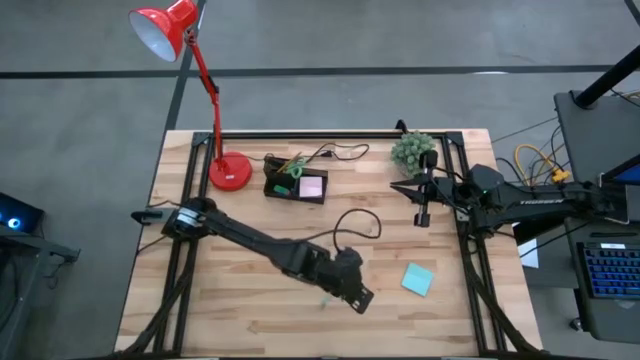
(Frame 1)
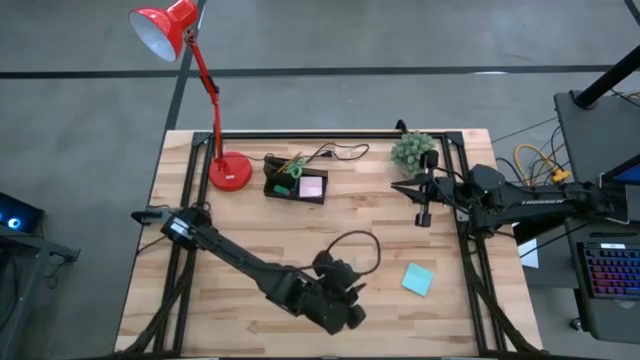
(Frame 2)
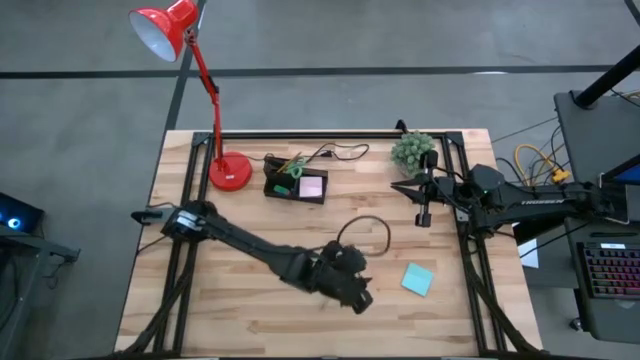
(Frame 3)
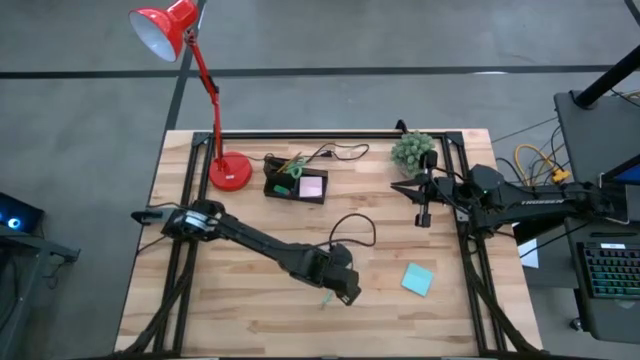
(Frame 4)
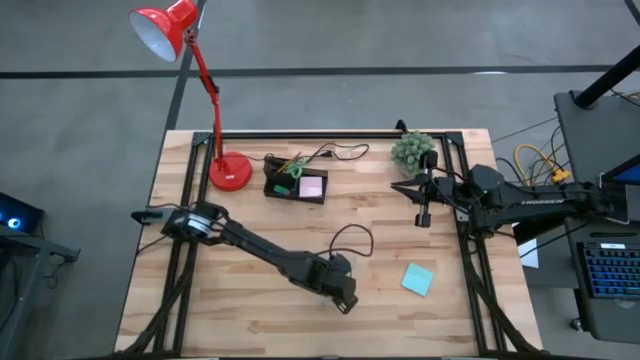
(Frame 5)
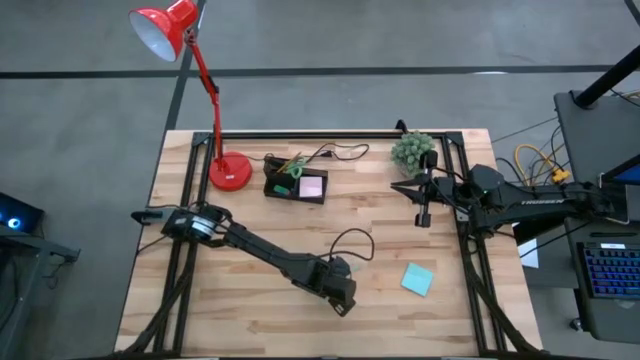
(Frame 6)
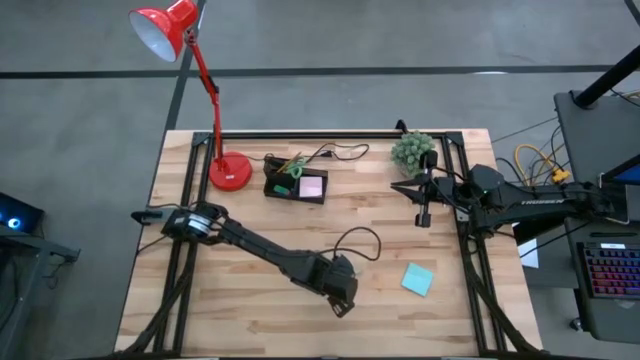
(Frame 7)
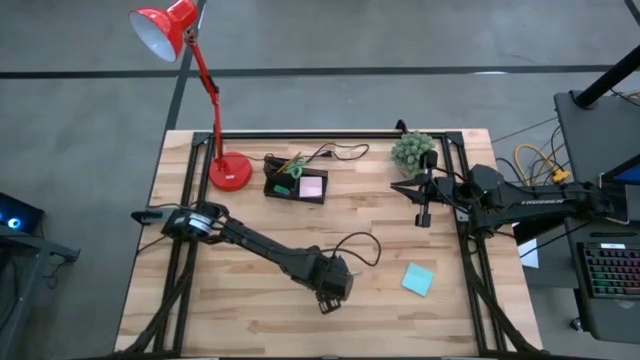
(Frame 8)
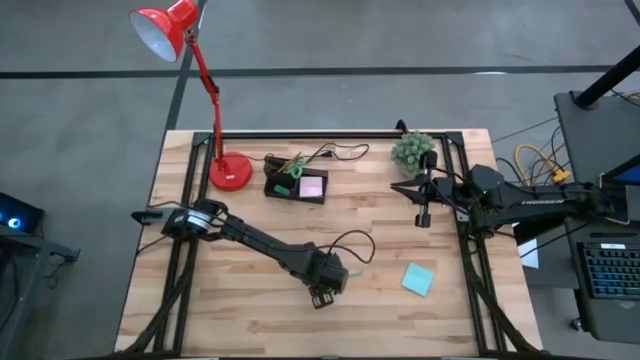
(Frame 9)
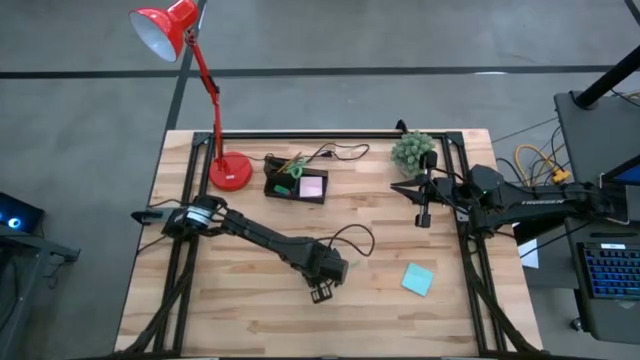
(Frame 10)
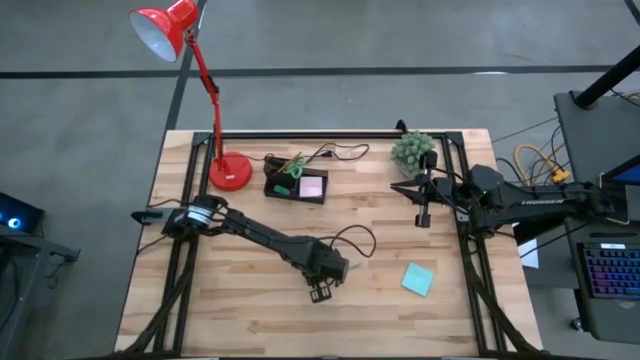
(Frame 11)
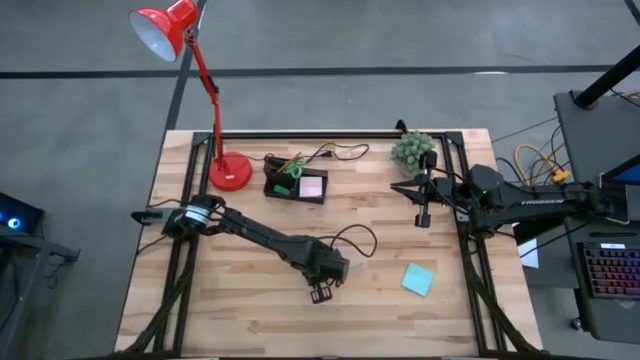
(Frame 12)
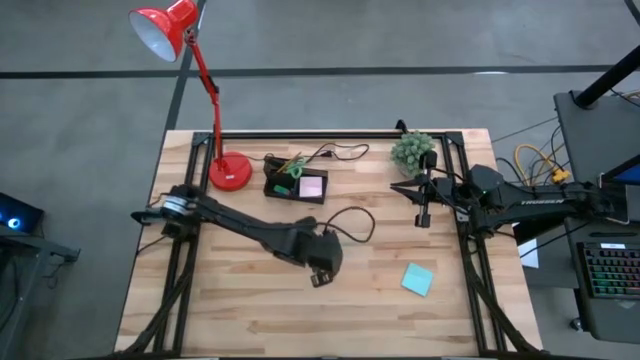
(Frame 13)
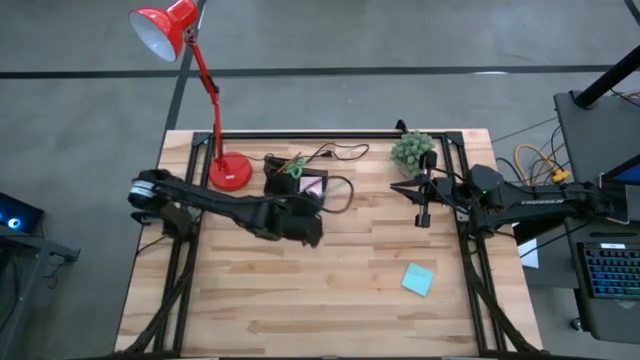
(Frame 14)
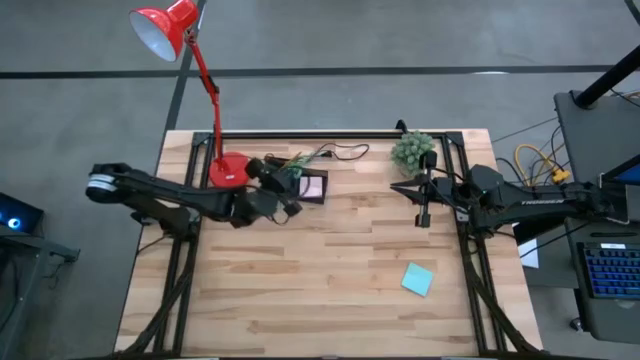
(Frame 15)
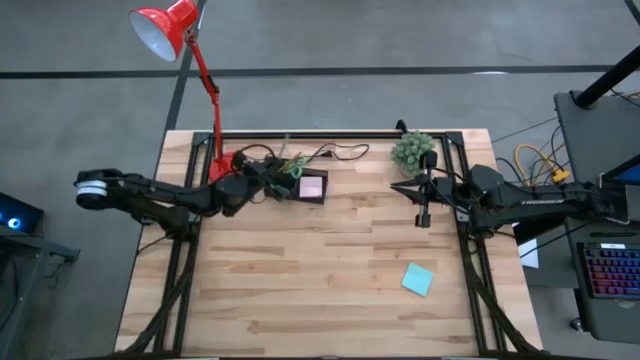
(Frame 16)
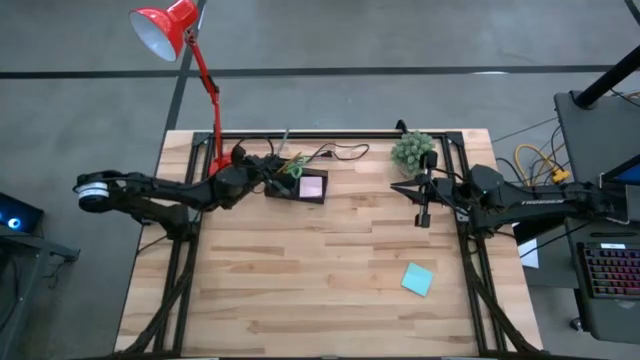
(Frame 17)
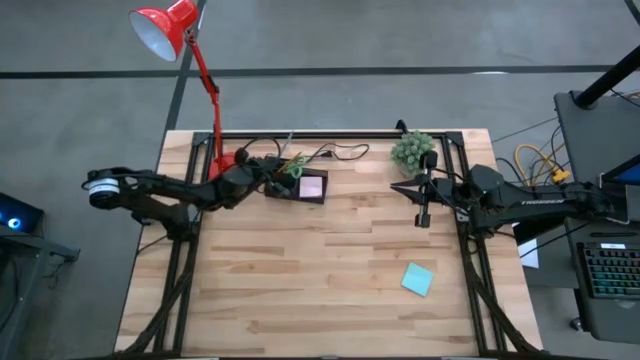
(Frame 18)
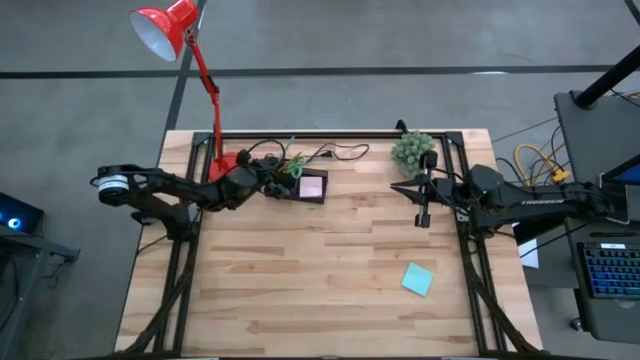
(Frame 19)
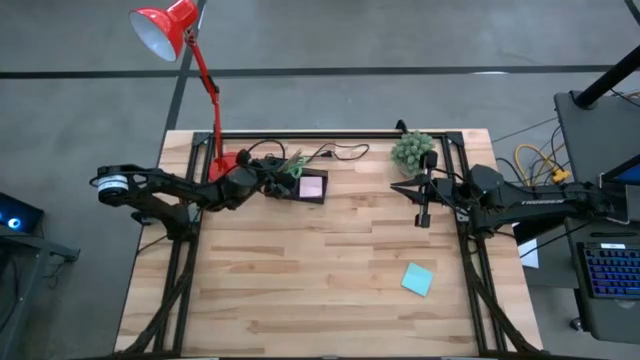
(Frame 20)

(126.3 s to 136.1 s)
Task: Pick and place office supplies into organizer
Put the blue pencil into the black mesh desk organizer

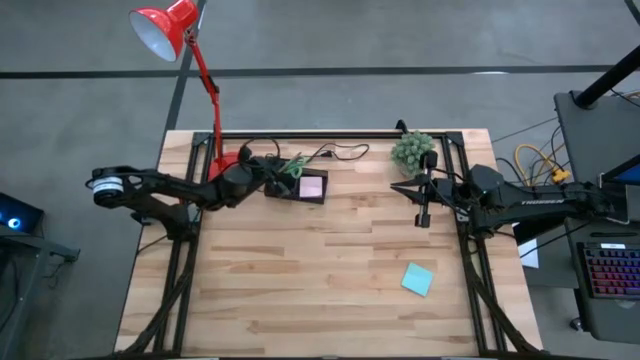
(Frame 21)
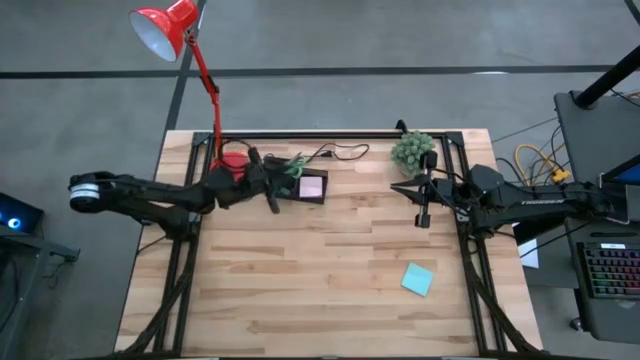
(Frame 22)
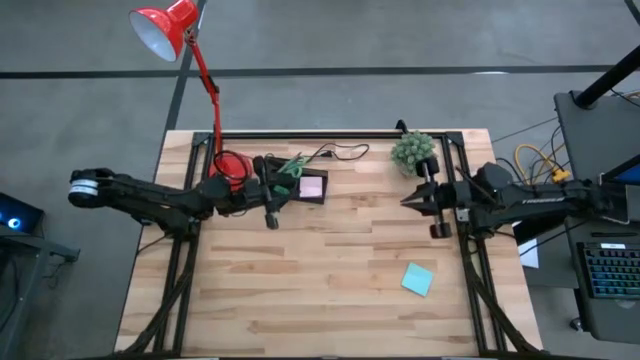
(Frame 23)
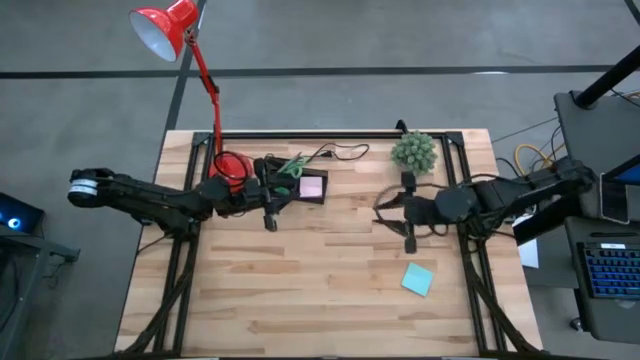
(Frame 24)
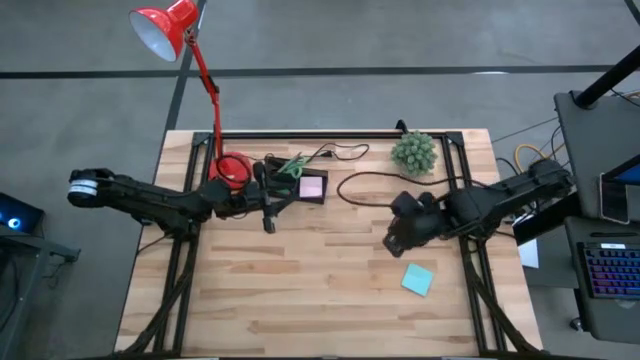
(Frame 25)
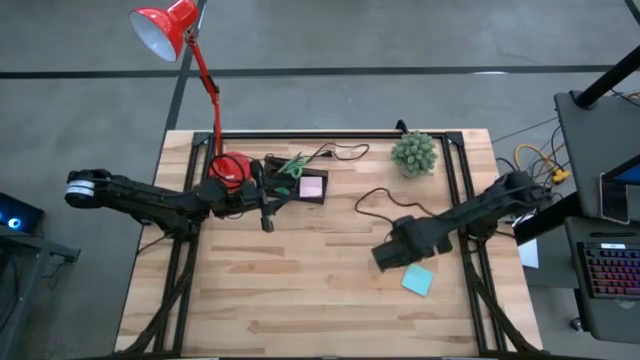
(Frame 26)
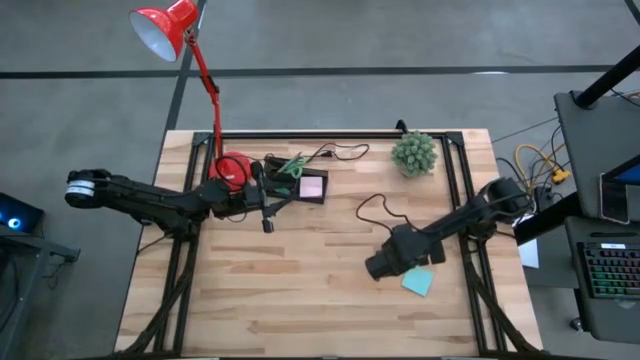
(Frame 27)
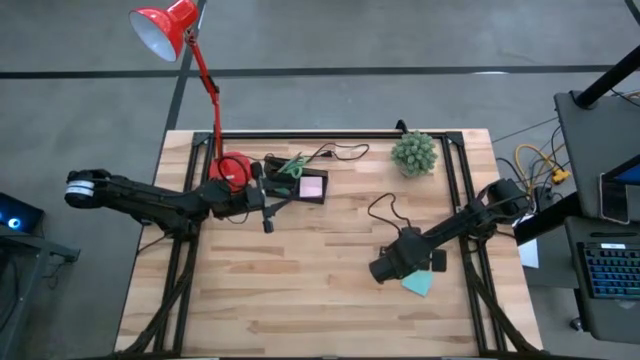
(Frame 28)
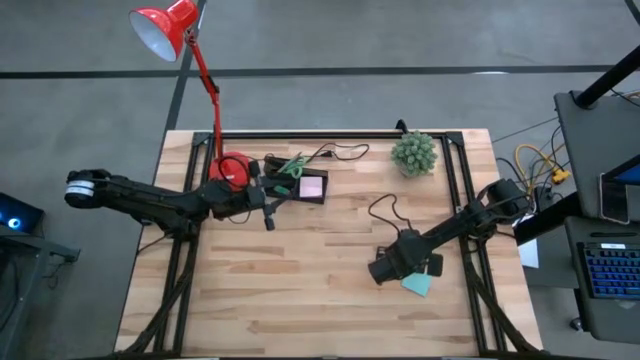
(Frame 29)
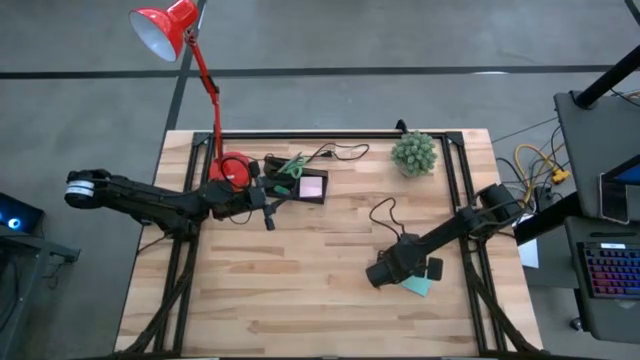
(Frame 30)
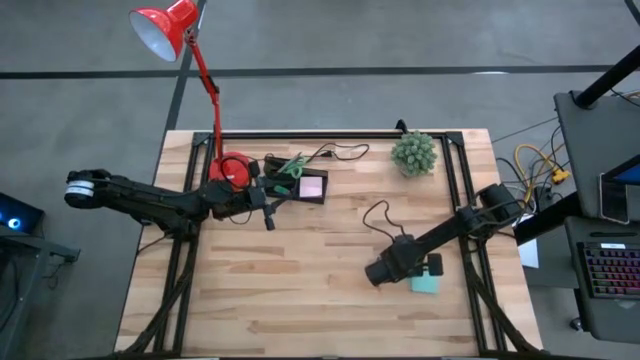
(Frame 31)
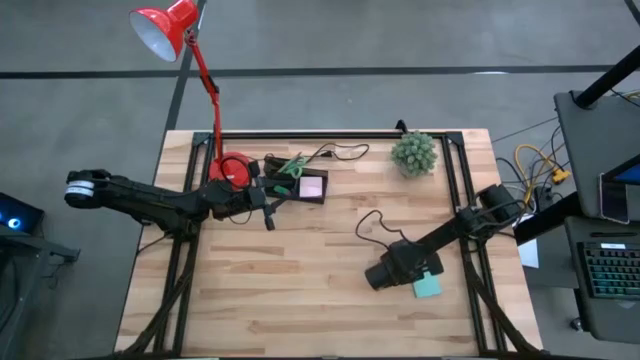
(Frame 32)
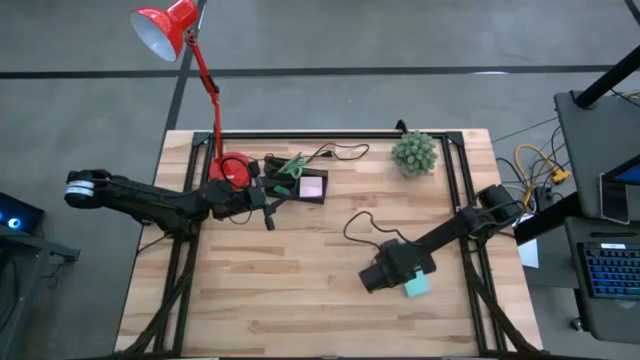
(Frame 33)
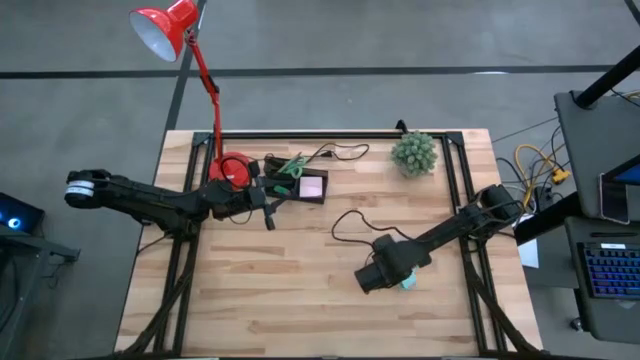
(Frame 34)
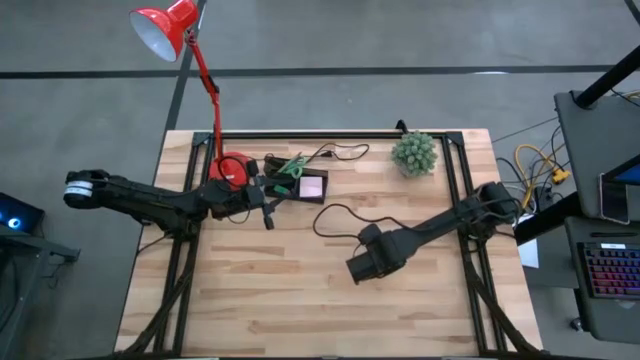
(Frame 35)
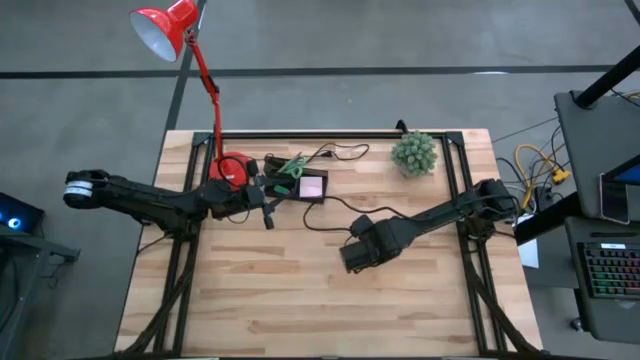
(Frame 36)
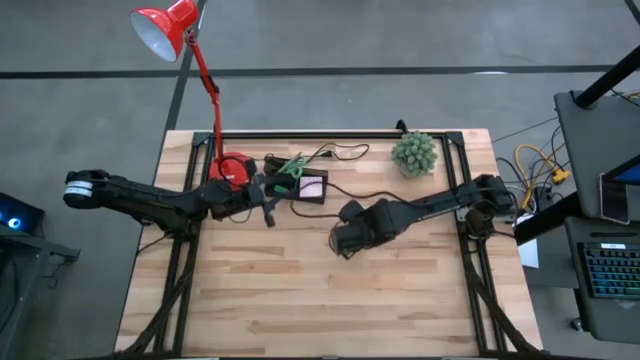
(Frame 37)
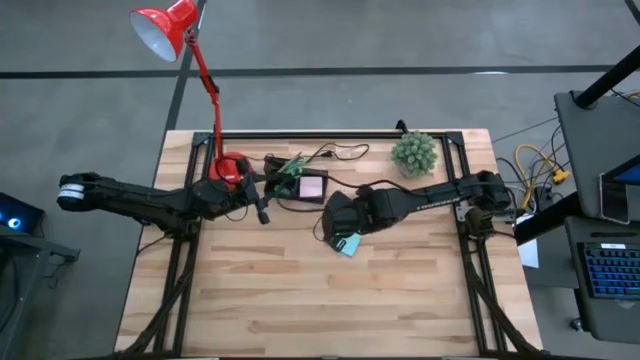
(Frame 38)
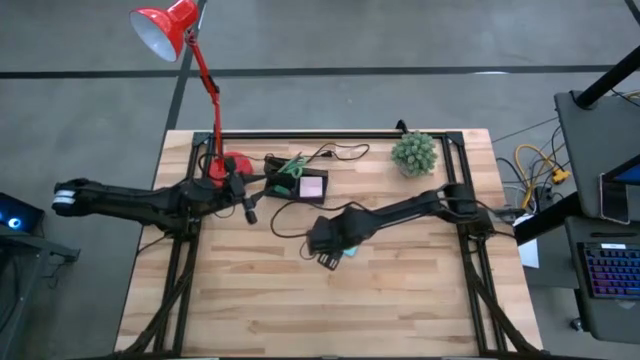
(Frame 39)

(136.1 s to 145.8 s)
Put the blue sticky notes into the black mesh desk organizer

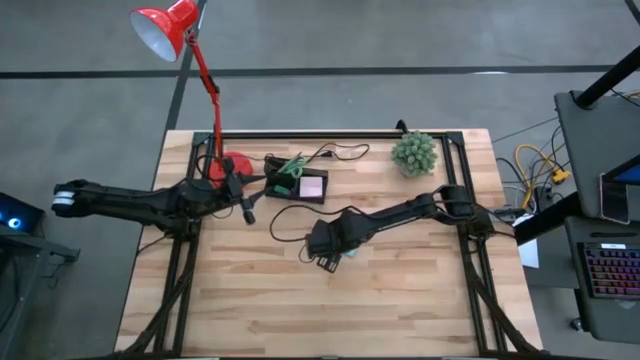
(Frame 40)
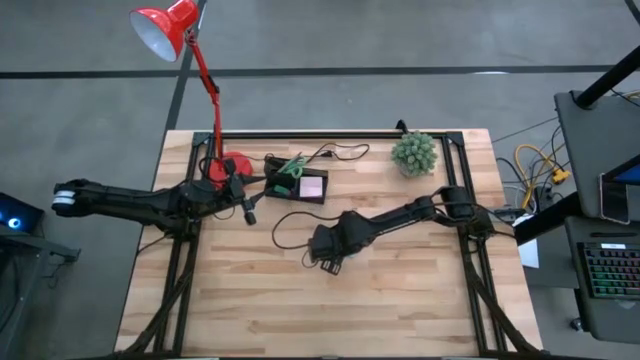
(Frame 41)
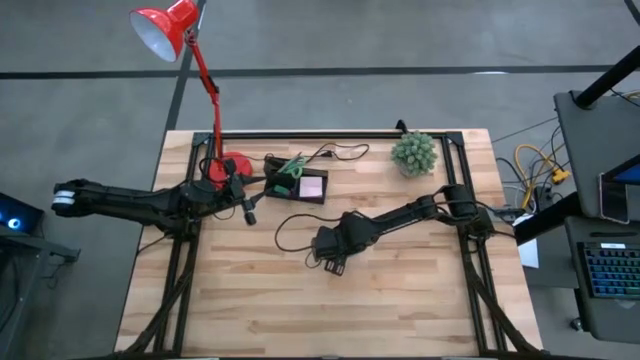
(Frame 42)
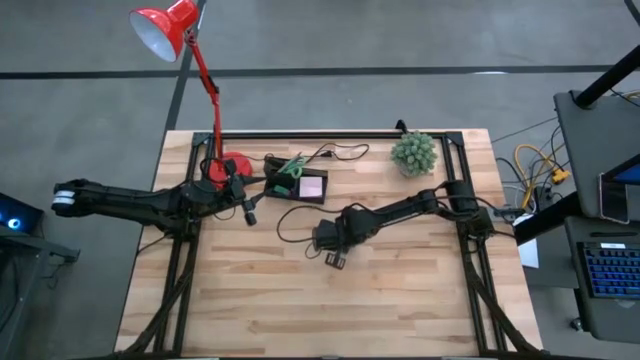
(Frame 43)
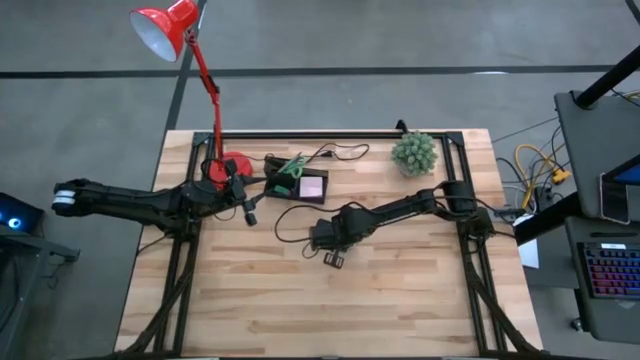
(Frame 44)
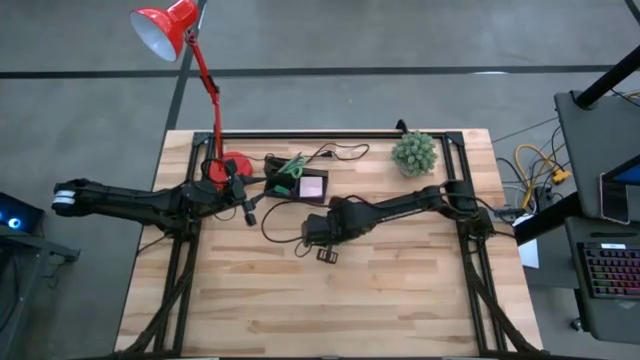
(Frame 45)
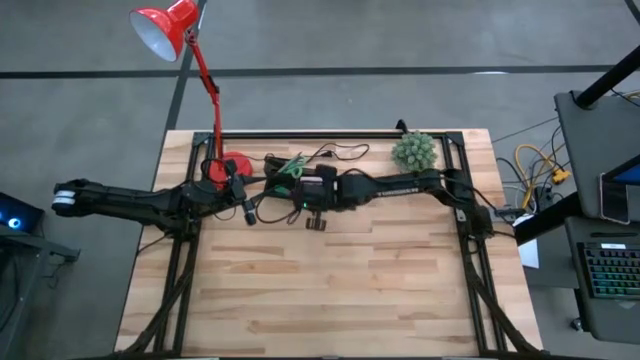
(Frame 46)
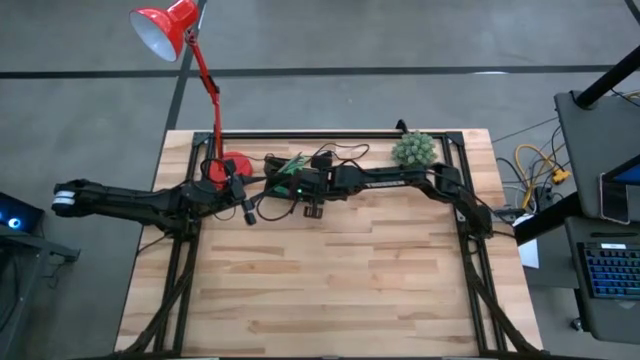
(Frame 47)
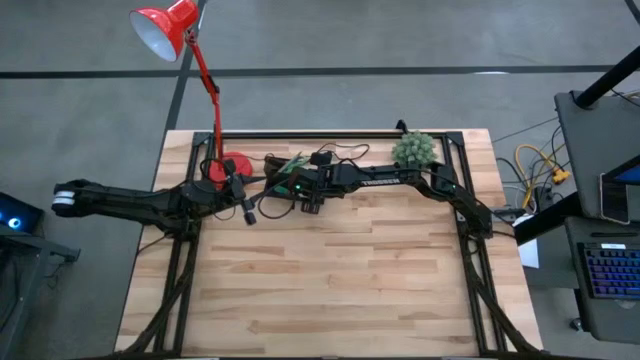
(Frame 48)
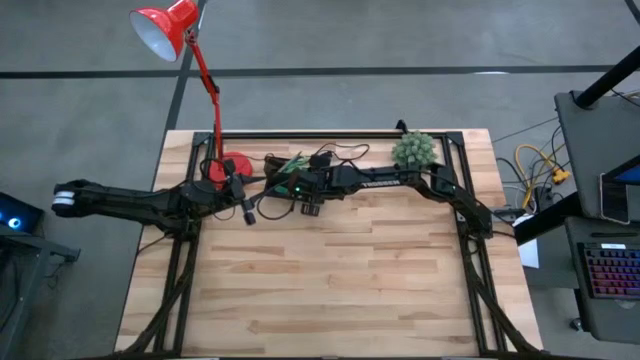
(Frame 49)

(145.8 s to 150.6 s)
Put the blue sticky notes into the black mesh desk organizer
